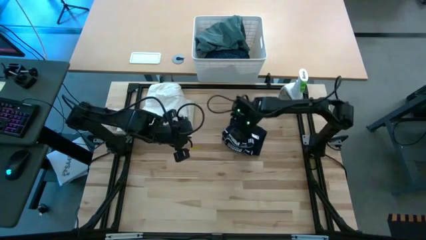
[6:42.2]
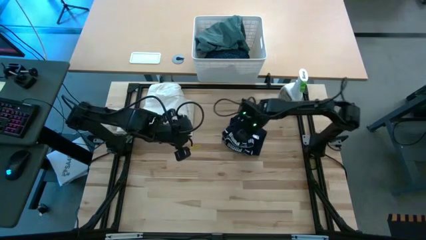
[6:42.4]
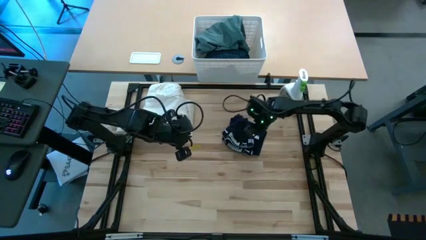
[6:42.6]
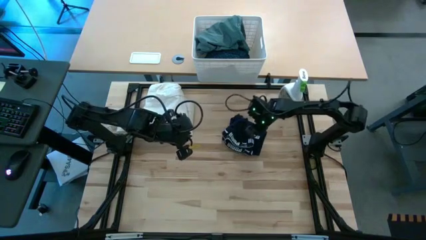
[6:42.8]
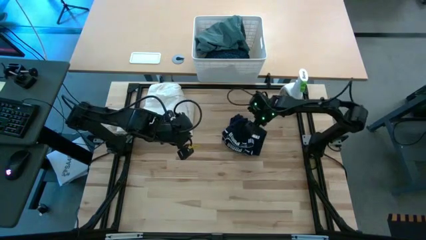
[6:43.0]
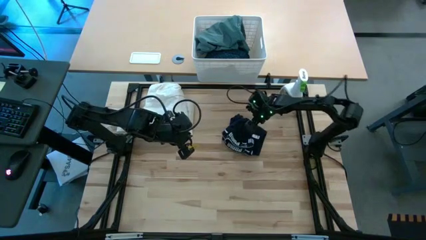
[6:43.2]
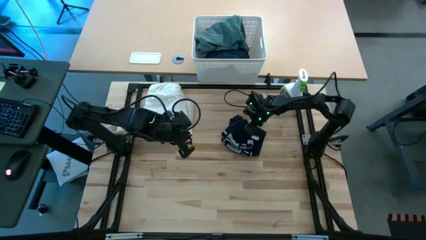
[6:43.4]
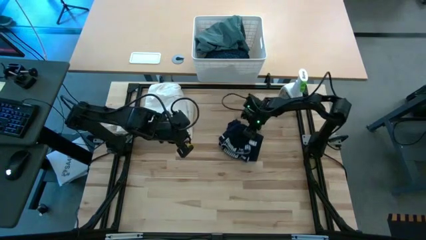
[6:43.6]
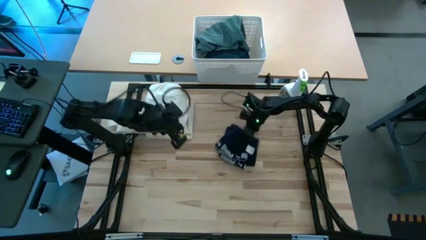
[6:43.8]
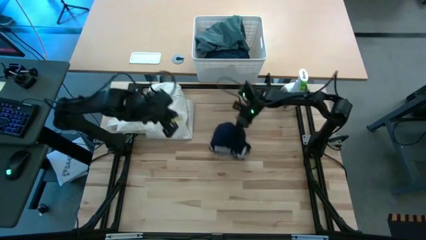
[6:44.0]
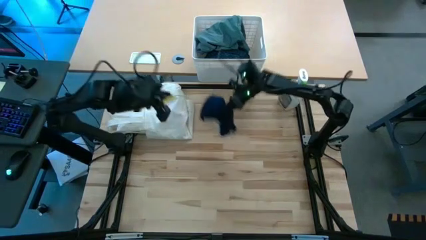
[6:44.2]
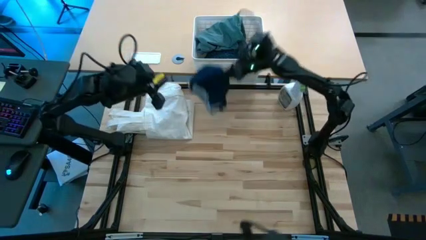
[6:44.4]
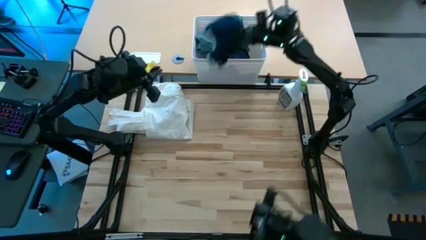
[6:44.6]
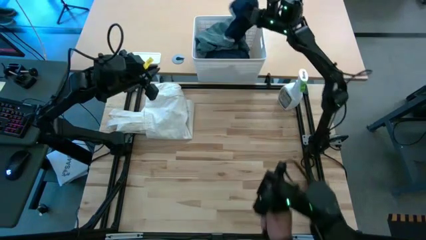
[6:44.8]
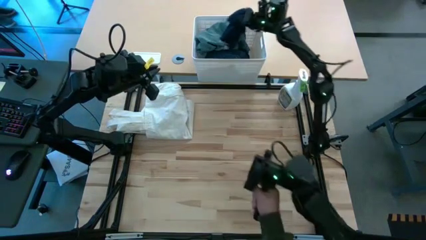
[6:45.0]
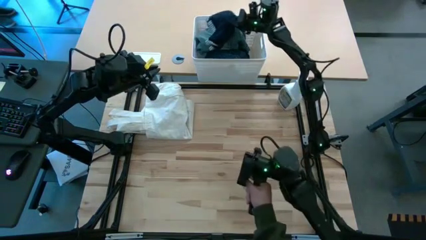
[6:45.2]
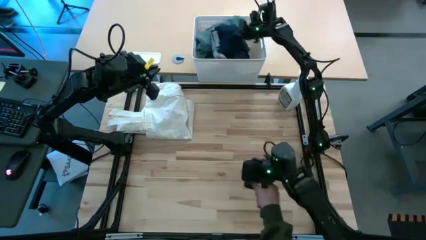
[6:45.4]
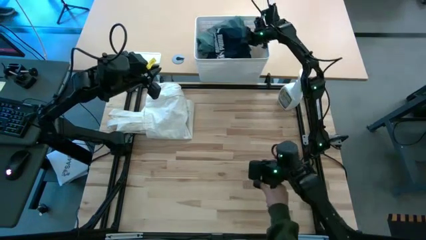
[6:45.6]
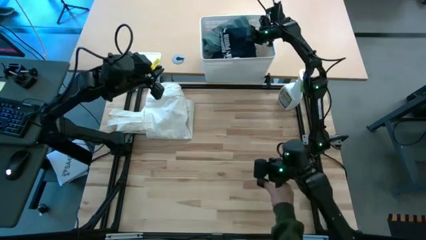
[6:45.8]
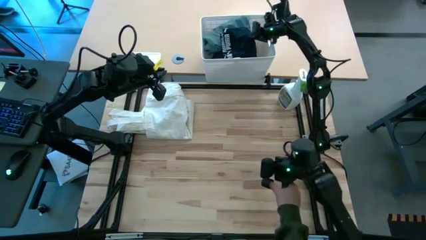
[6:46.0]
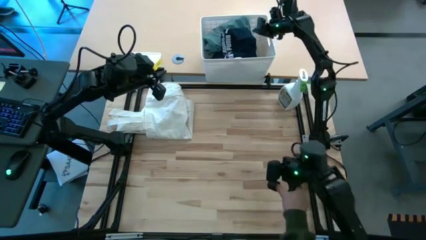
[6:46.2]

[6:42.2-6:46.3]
Put the folded blue boxer short into the white bin

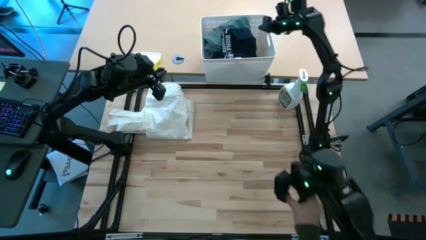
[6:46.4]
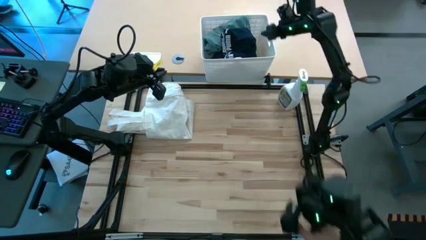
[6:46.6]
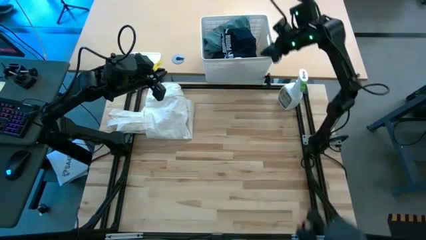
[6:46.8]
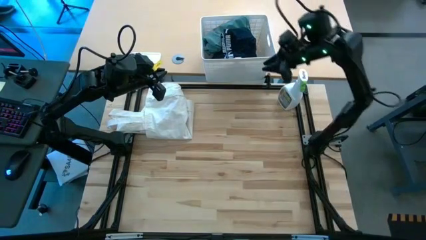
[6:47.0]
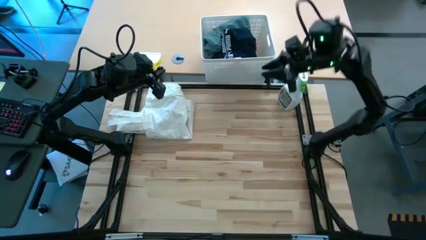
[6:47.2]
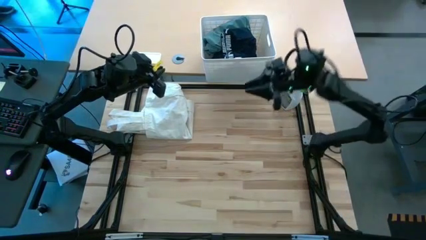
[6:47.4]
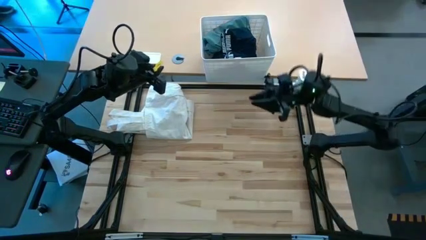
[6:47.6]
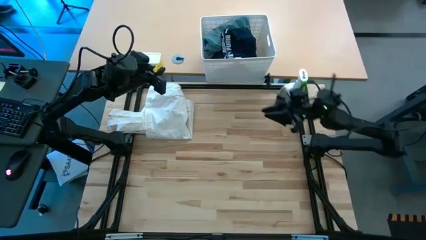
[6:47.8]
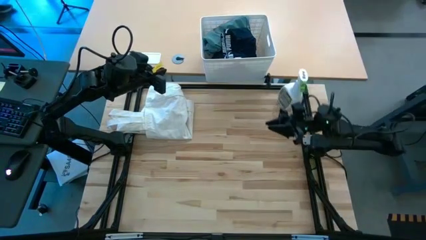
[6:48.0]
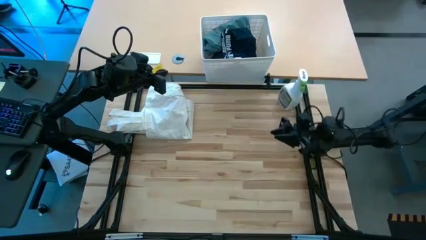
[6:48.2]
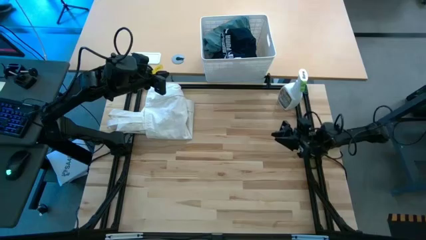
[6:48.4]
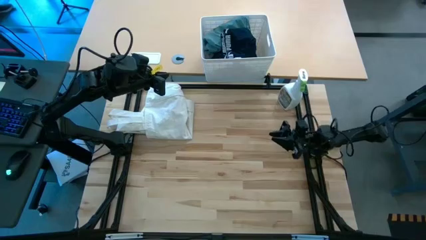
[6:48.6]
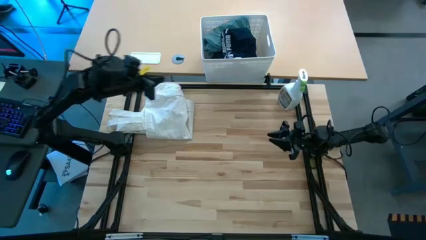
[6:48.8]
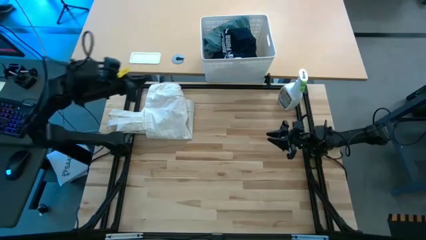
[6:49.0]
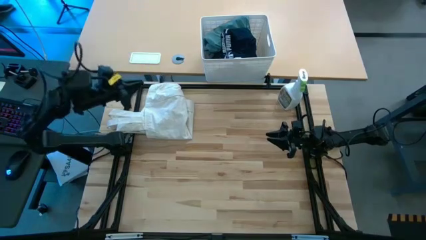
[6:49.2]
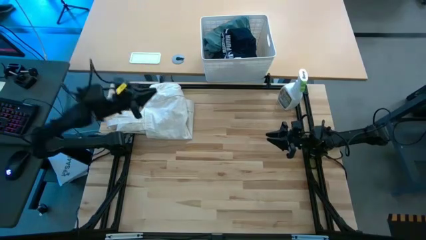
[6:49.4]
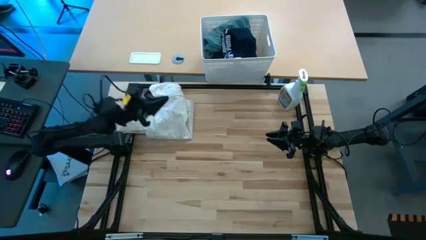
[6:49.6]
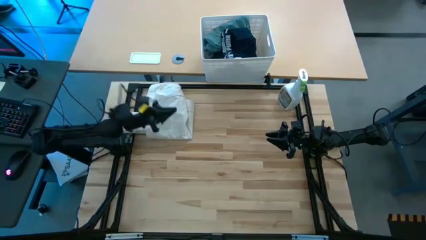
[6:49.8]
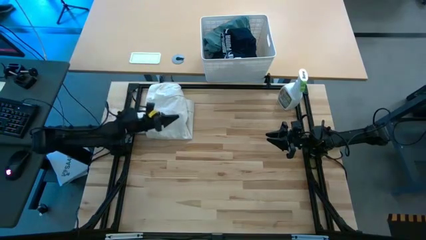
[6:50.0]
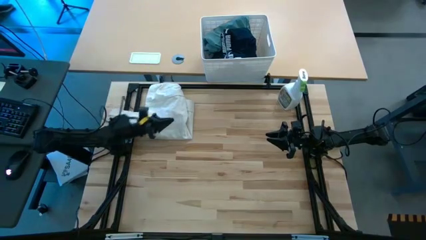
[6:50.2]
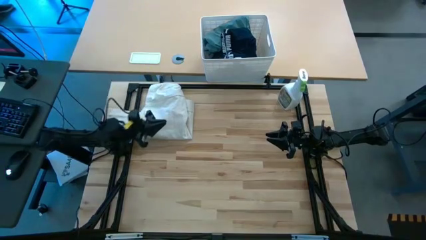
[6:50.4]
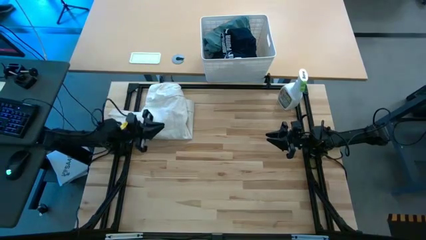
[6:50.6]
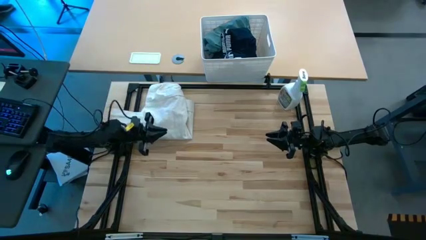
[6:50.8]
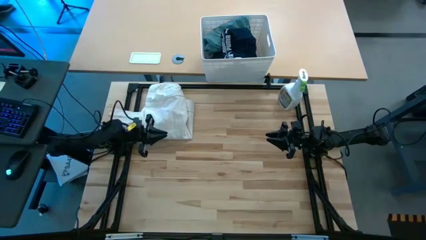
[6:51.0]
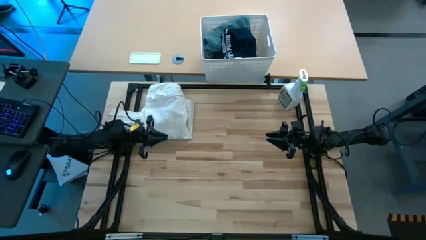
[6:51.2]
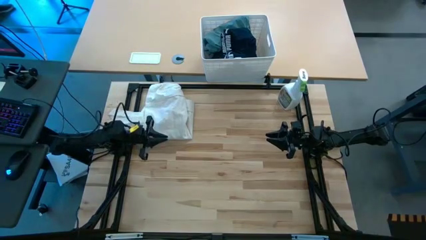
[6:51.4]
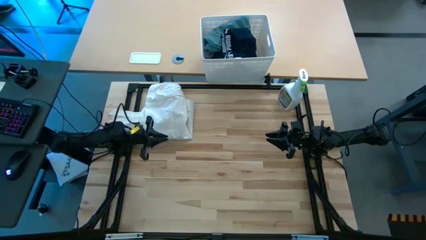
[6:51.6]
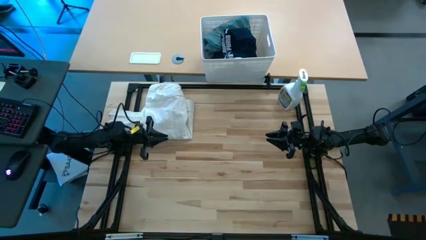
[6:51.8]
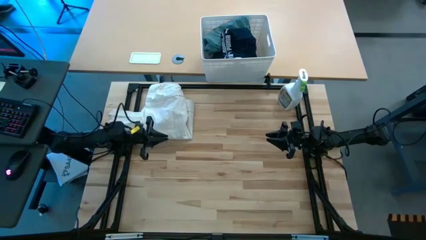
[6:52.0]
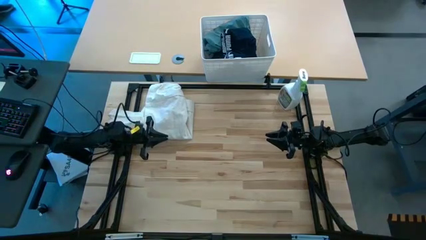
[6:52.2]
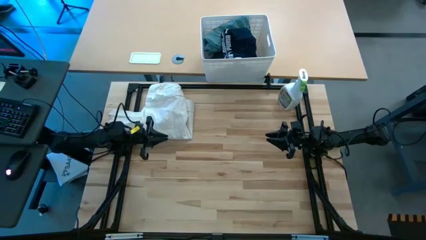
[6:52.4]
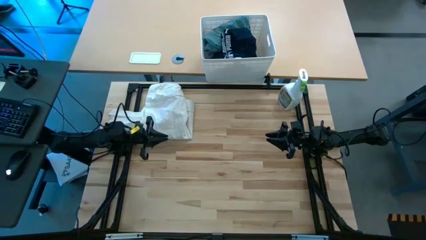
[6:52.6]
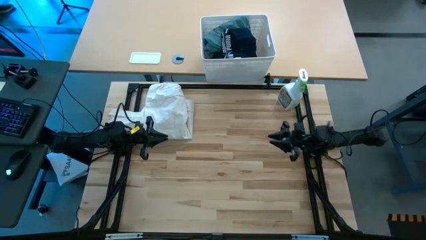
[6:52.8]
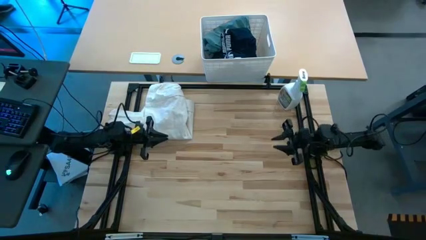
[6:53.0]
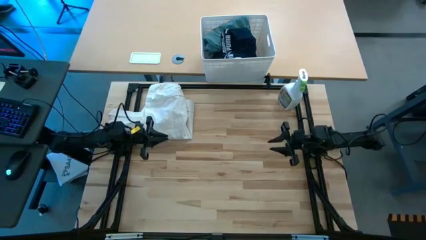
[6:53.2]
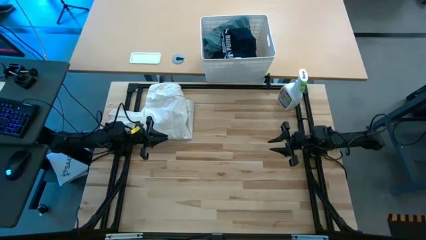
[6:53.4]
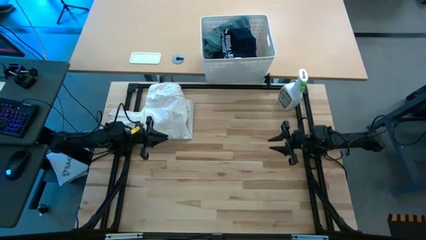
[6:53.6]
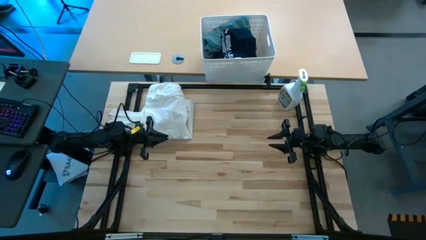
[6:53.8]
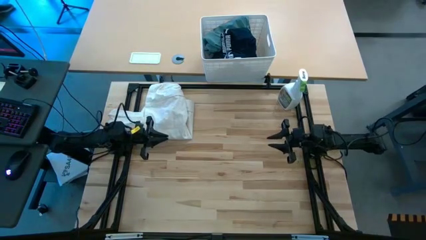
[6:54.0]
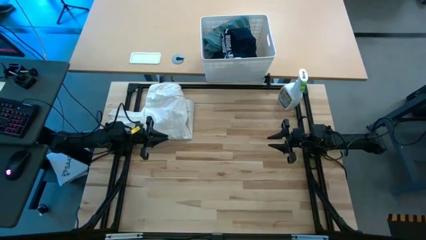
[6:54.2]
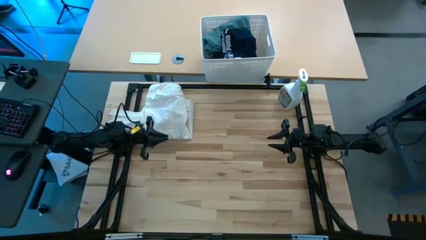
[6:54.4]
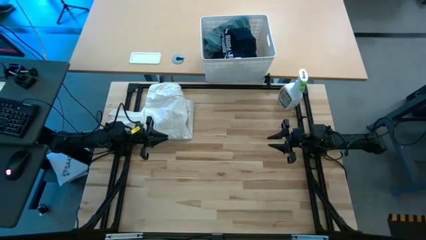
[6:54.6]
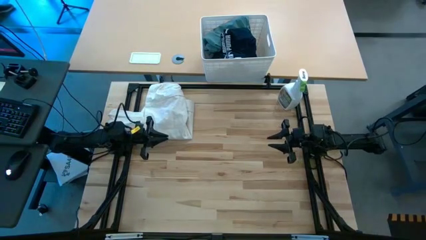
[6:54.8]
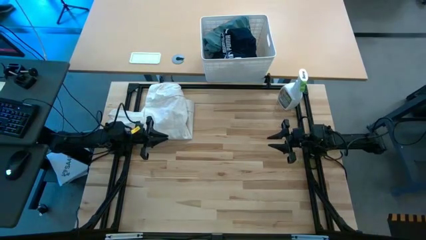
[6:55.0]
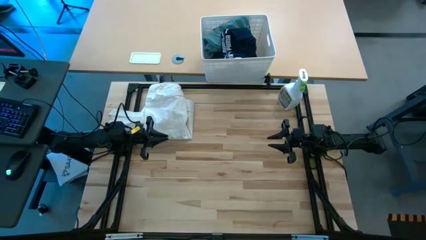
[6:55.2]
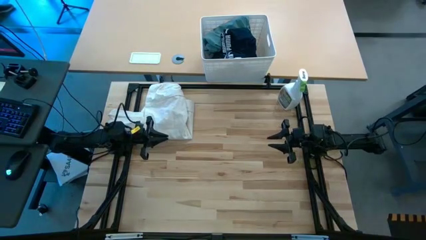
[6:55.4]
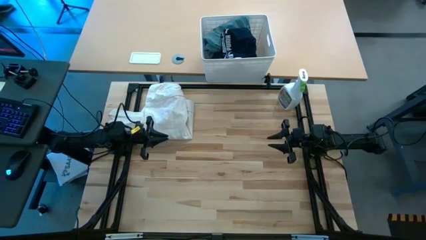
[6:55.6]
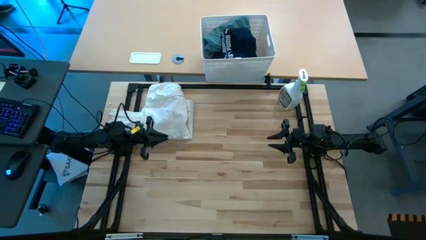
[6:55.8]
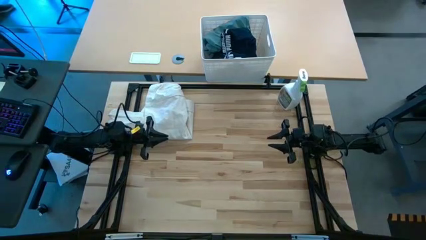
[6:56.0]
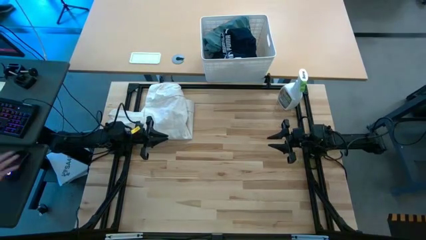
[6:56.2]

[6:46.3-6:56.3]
Return to Home Position
